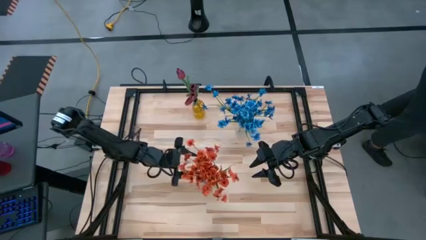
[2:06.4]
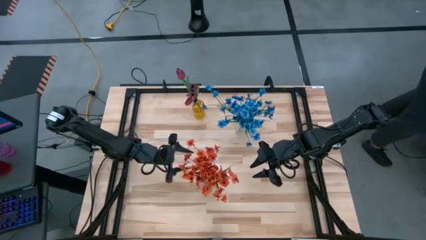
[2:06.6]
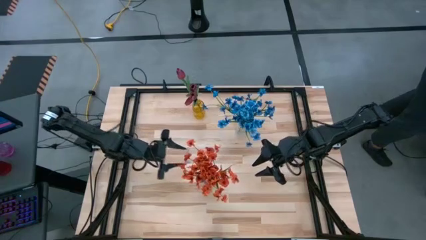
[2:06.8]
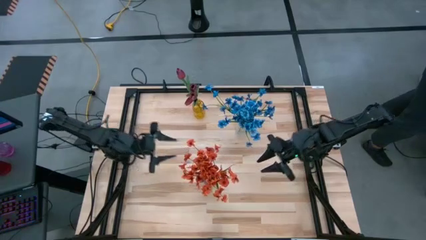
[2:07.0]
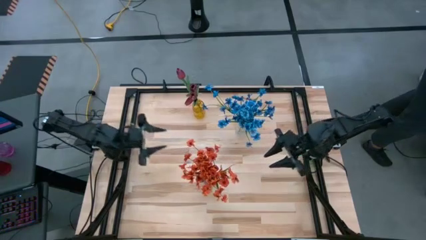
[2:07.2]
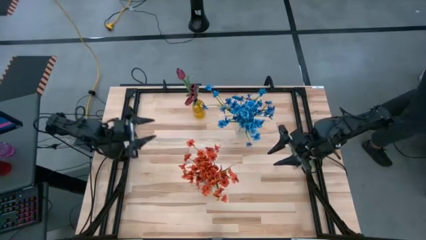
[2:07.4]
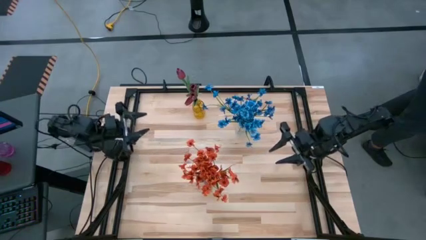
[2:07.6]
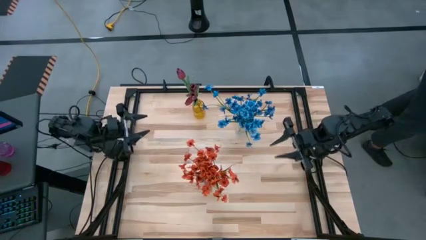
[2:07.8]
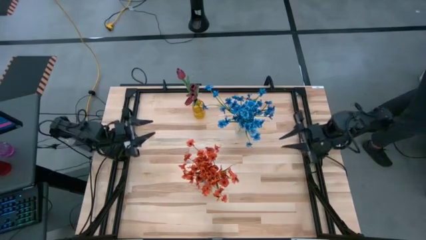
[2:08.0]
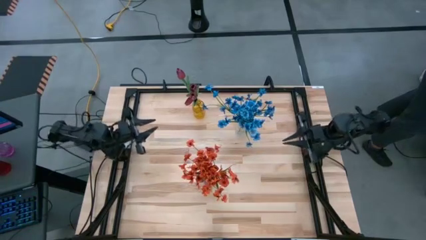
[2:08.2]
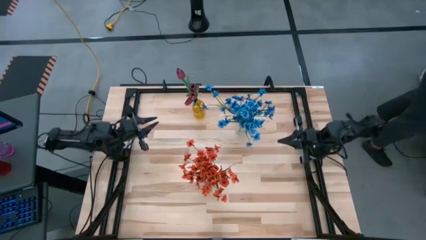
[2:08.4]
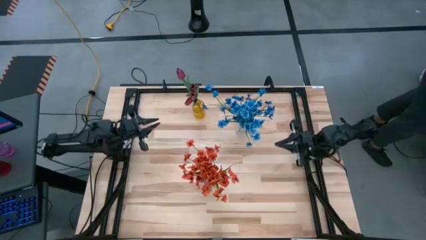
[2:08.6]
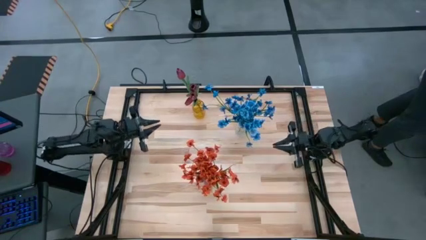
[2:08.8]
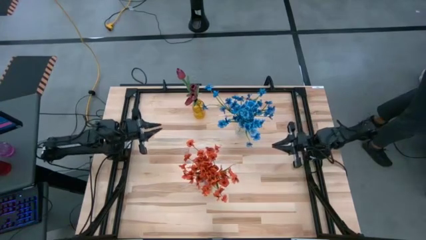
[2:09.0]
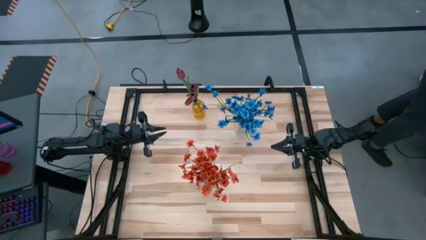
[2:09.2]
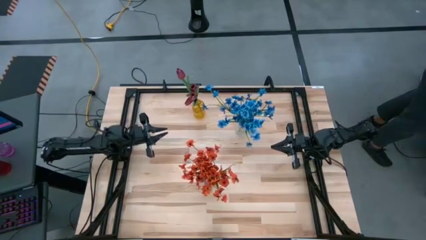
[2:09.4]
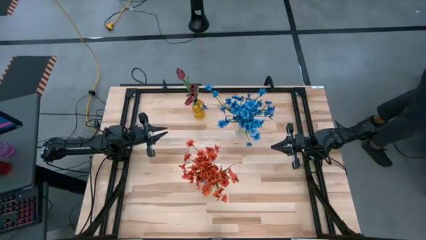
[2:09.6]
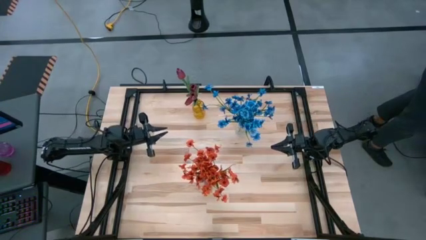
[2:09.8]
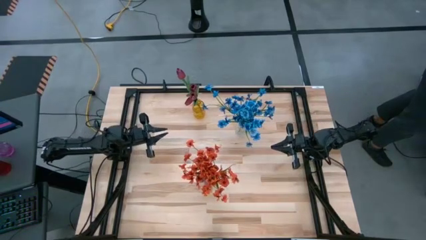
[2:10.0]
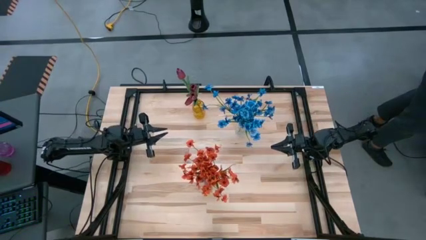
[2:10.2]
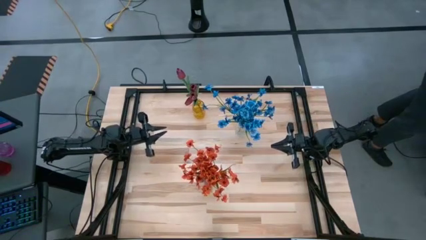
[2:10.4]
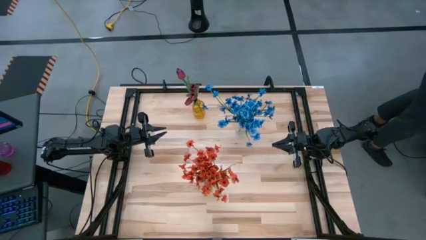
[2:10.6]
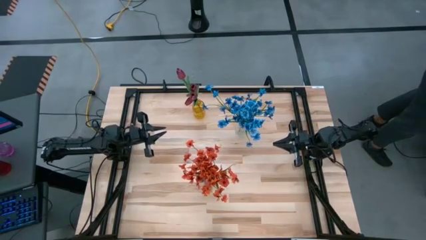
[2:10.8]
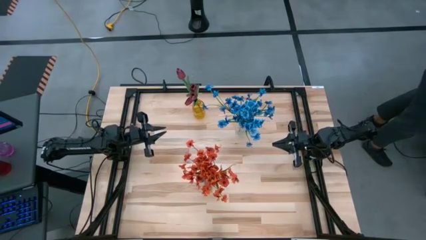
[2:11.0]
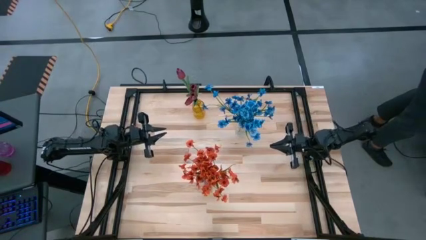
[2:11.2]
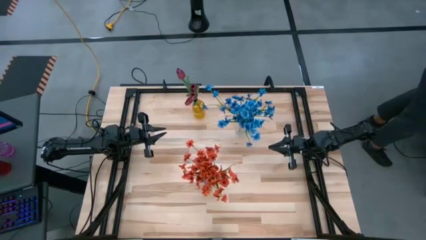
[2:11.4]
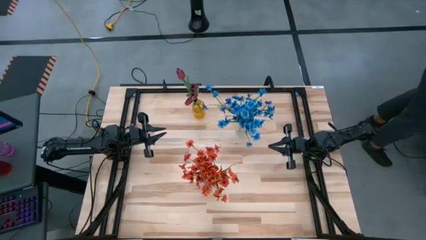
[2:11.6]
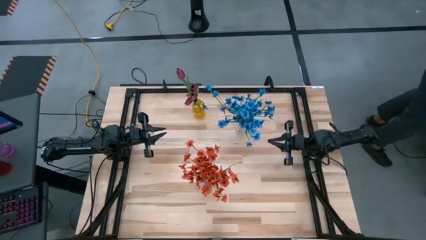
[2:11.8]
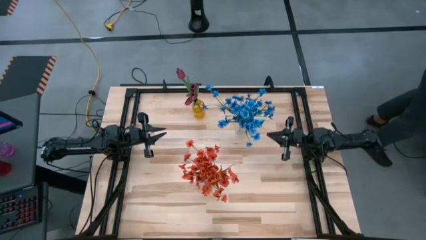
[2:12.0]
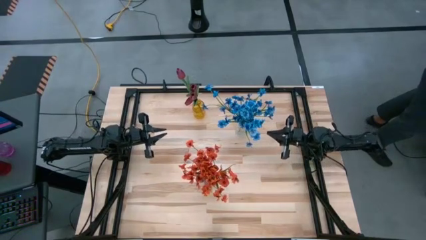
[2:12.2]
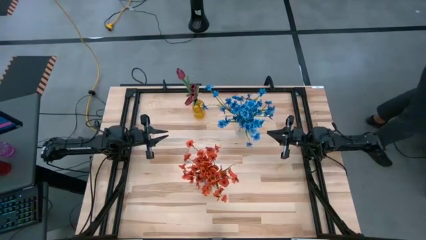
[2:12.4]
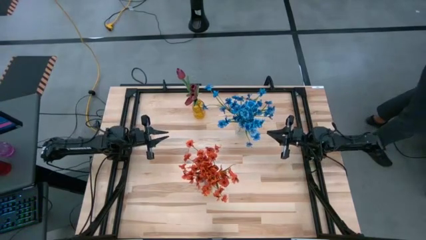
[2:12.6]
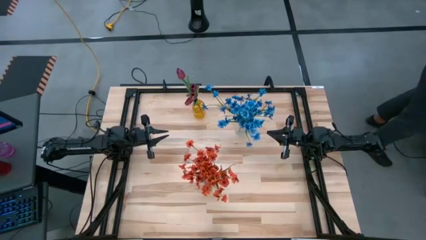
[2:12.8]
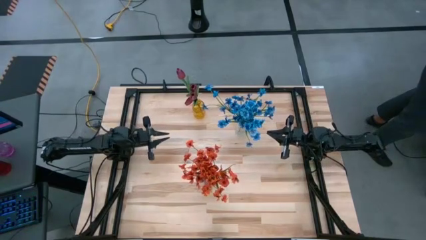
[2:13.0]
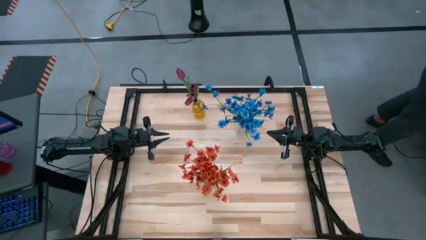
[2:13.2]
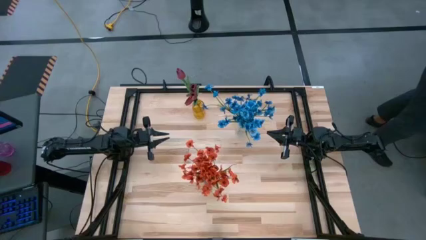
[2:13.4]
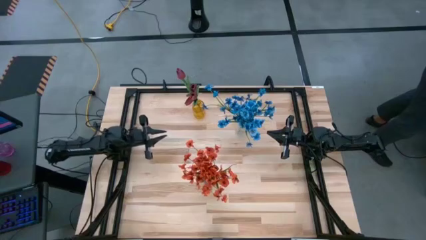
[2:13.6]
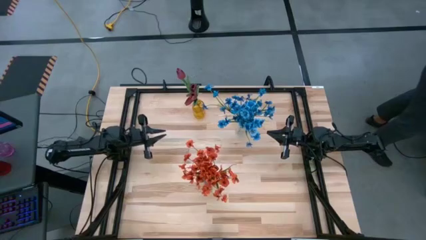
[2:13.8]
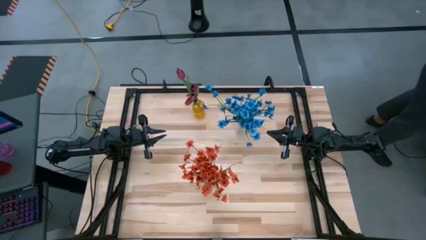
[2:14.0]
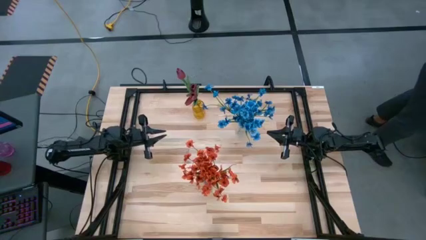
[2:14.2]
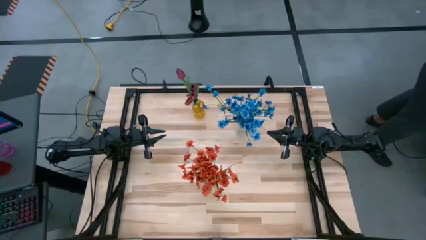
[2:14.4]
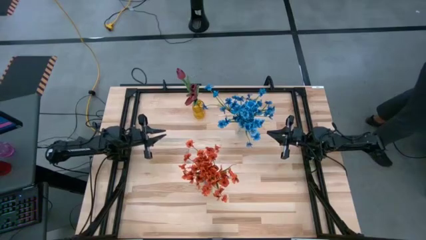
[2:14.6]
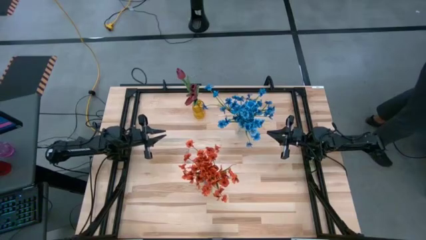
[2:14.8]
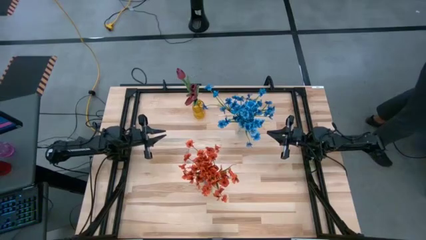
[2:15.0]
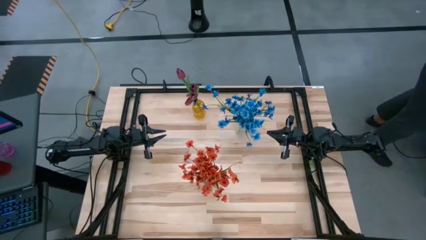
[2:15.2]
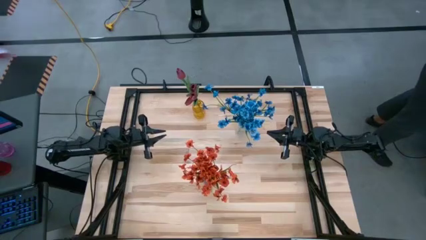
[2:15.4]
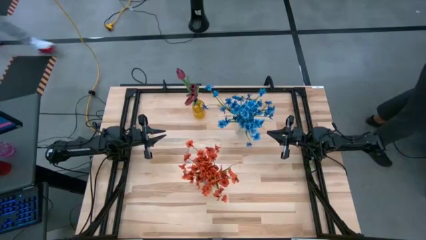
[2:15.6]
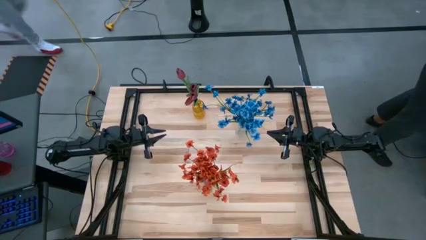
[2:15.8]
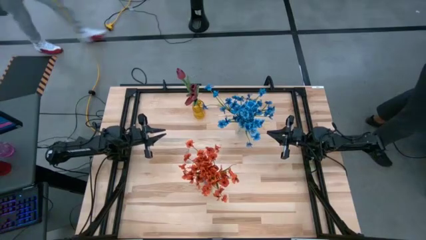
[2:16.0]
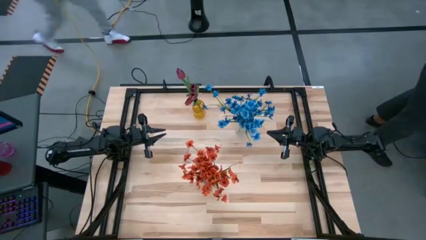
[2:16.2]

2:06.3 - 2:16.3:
Task: Sort flowers into vase by color
Return to Home Position

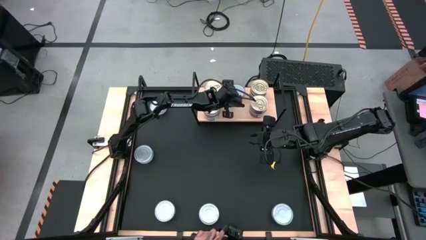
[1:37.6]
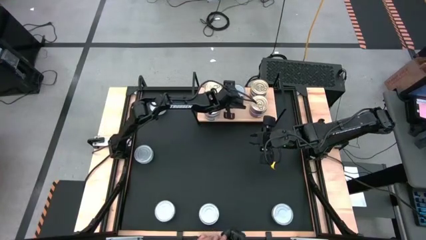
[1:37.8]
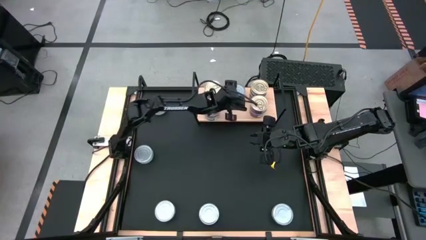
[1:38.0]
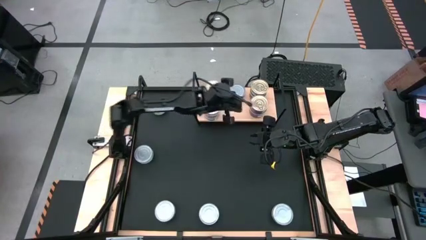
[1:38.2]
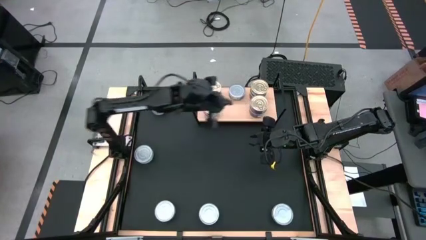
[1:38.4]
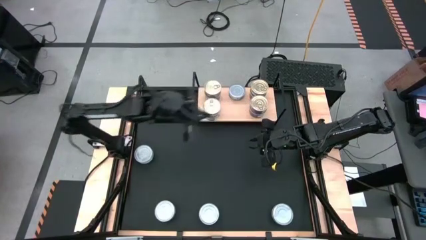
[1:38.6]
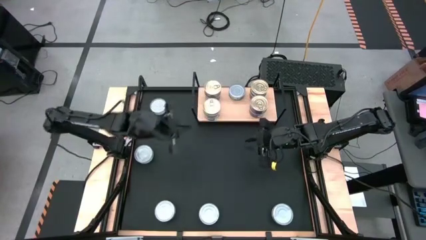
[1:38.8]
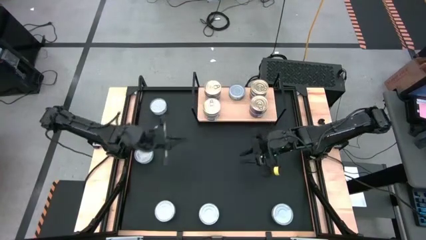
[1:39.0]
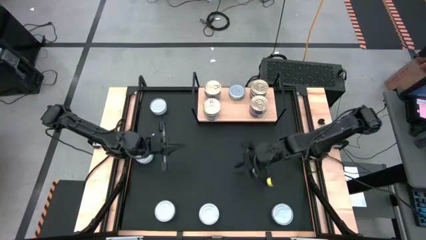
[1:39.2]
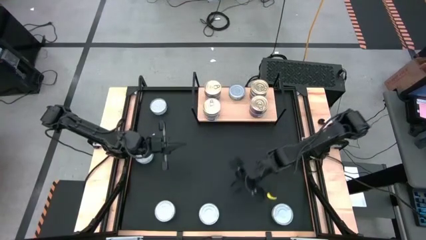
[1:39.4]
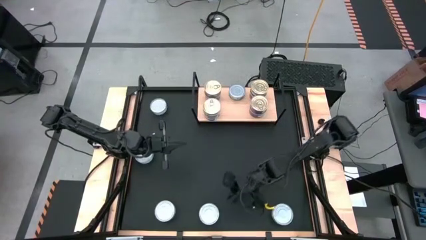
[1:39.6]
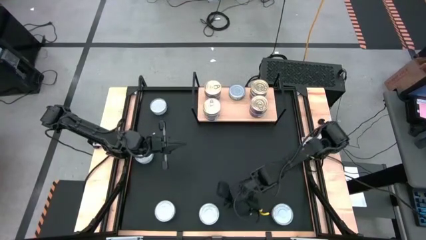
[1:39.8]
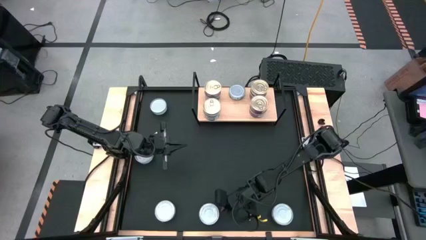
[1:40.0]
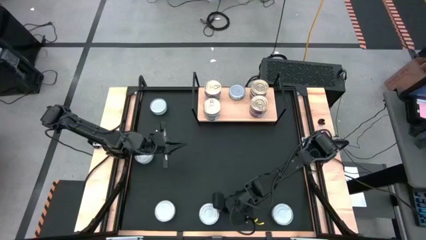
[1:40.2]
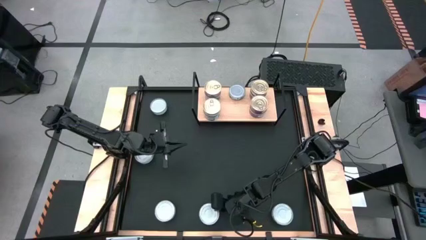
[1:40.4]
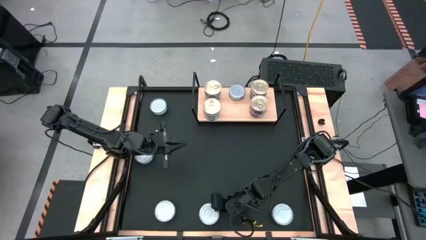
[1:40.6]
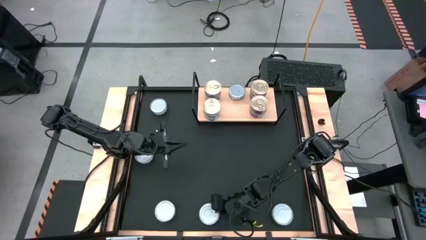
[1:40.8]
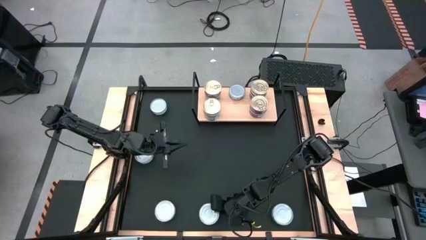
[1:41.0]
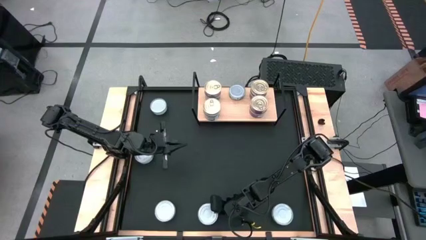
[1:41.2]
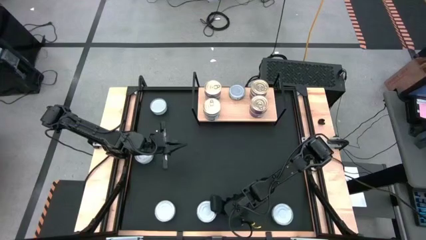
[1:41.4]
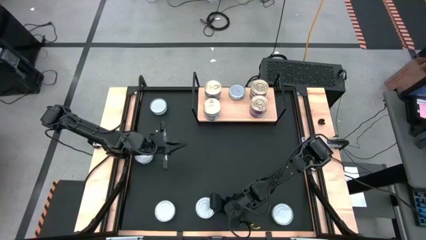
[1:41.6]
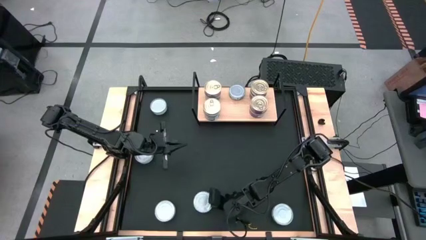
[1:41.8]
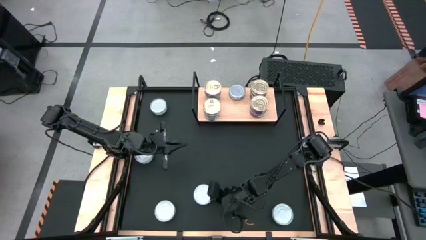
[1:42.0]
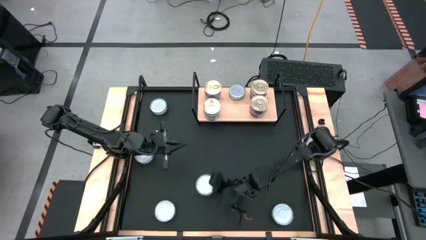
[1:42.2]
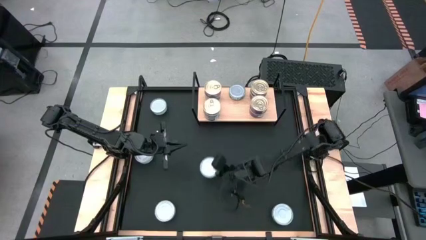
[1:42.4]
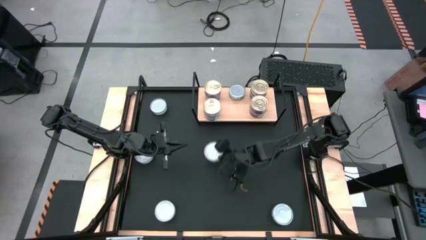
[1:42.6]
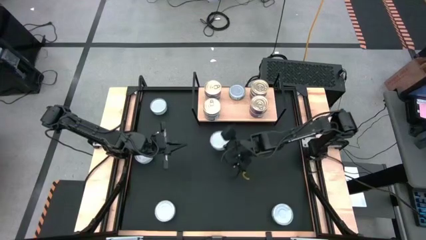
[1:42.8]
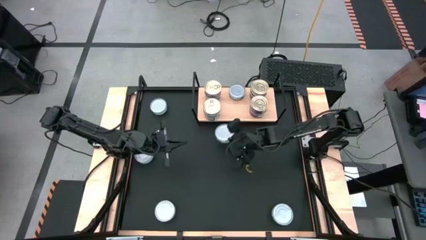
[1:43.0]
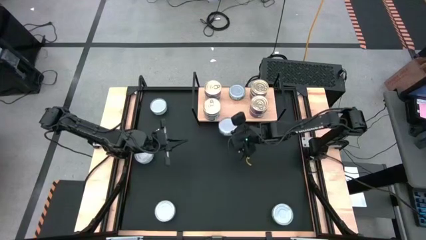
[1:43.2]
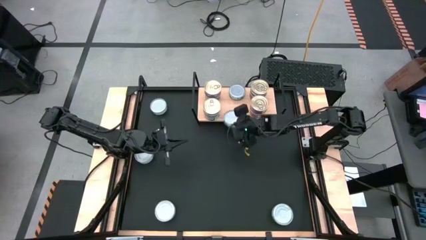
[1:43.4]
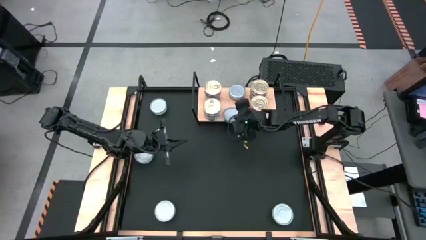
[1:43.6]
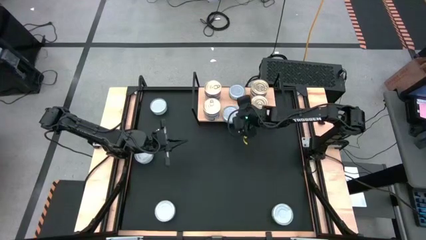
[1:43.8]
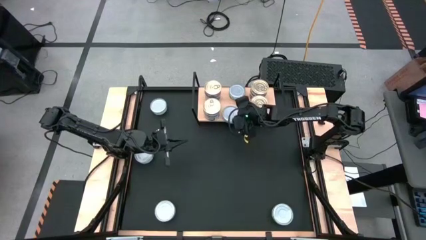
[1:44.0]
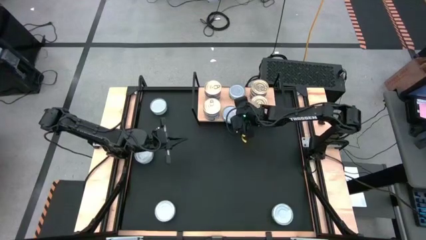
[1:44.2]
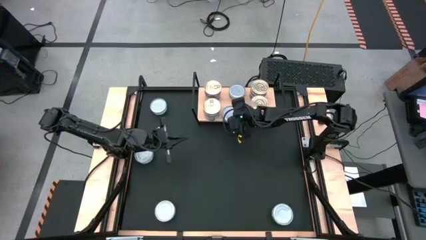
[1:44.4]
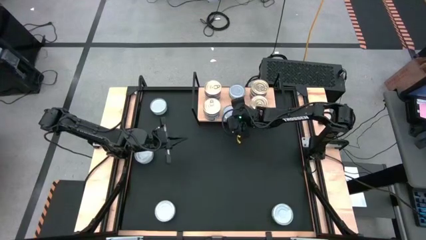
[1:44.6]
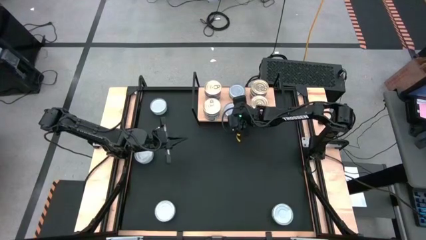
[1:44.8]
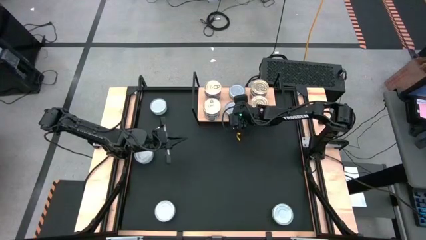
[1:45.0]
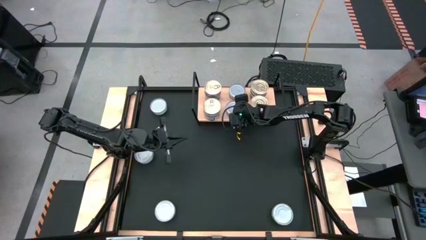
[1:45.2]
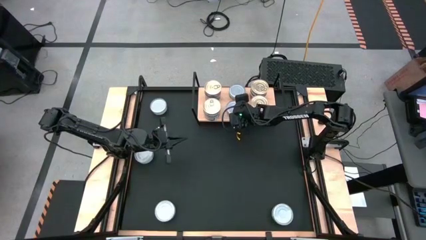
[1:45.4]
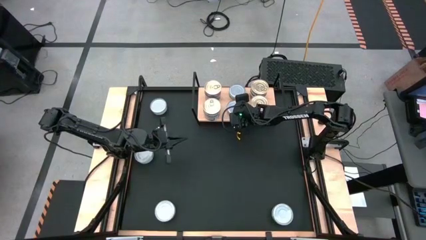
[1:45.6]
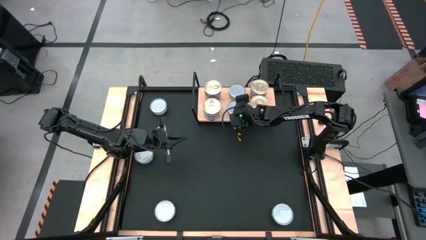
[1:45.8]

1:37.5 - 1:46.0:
Task: Stack canned seafood by type on shelf
Put the green tuna can on the shelf
